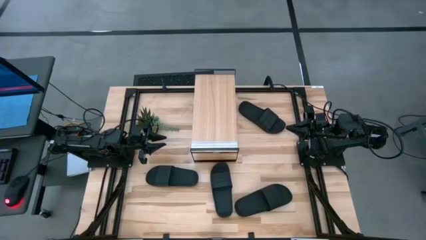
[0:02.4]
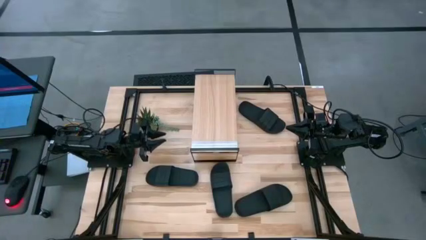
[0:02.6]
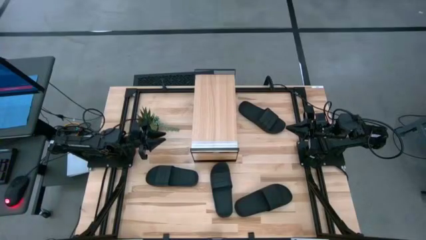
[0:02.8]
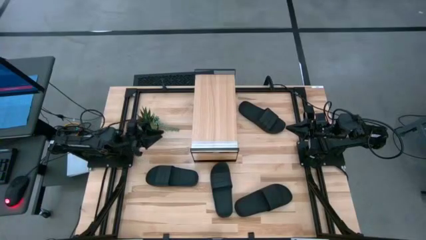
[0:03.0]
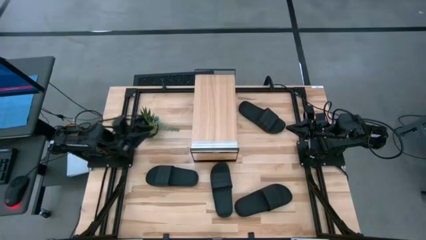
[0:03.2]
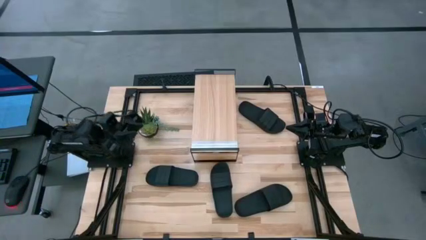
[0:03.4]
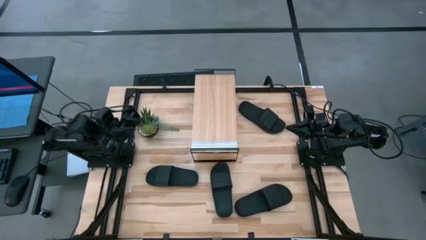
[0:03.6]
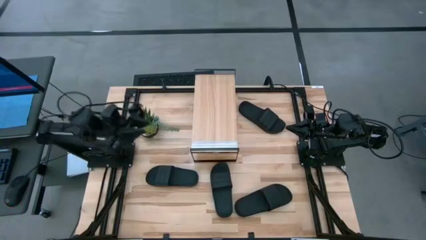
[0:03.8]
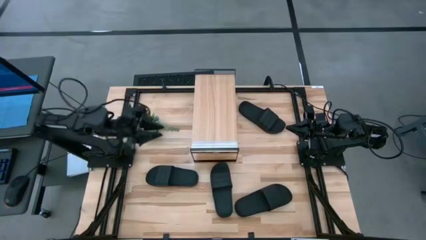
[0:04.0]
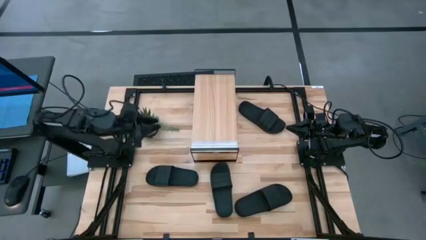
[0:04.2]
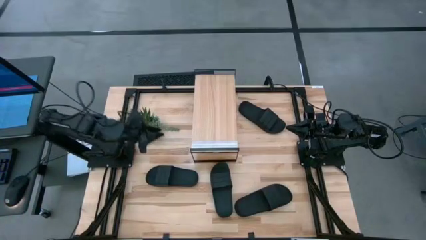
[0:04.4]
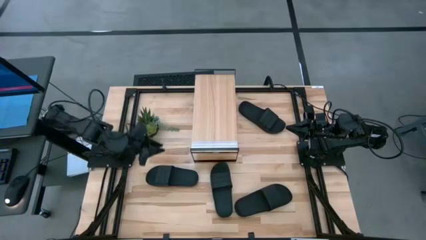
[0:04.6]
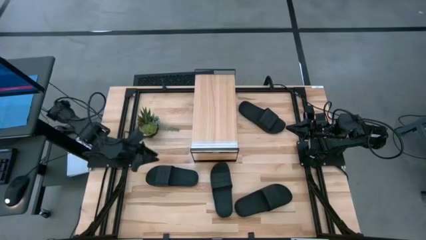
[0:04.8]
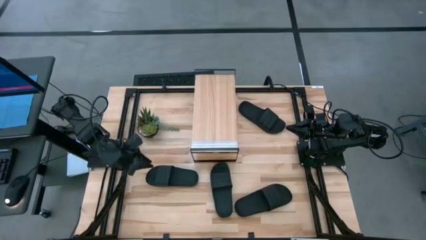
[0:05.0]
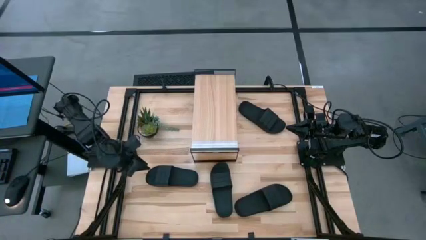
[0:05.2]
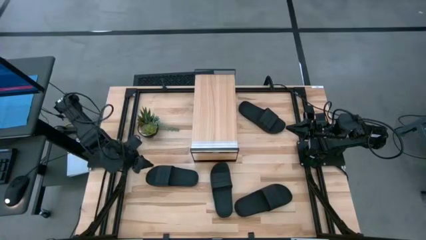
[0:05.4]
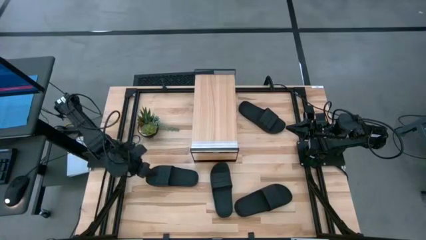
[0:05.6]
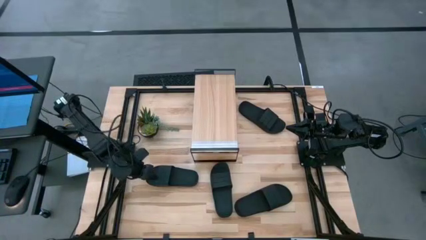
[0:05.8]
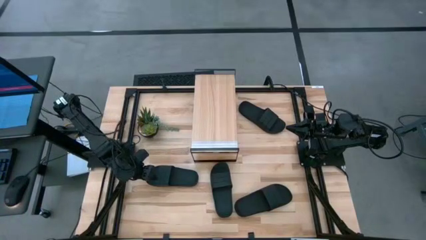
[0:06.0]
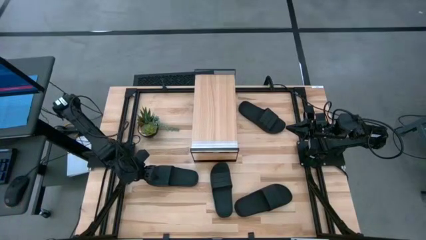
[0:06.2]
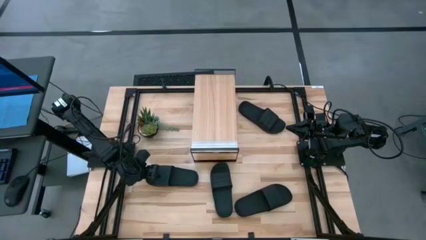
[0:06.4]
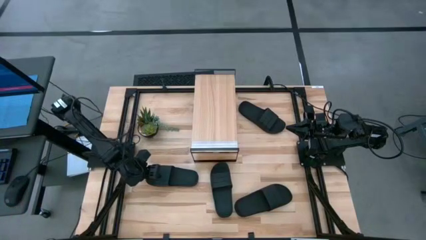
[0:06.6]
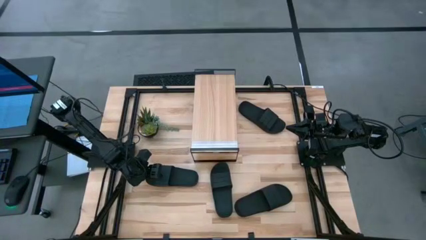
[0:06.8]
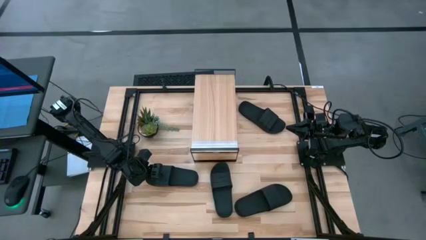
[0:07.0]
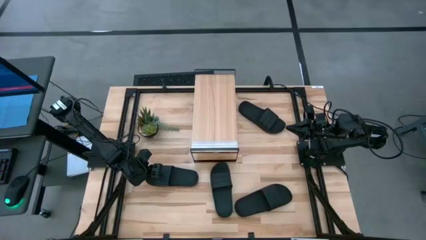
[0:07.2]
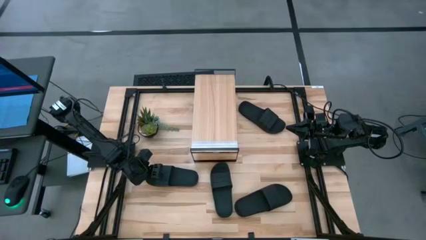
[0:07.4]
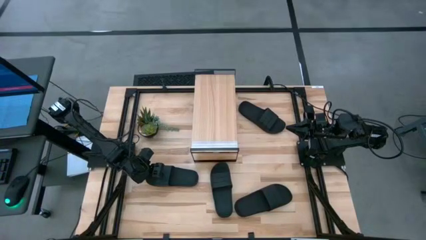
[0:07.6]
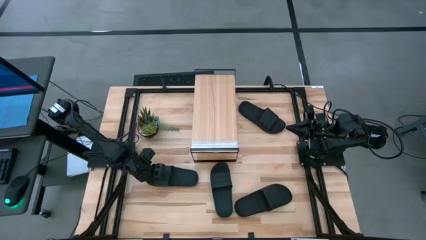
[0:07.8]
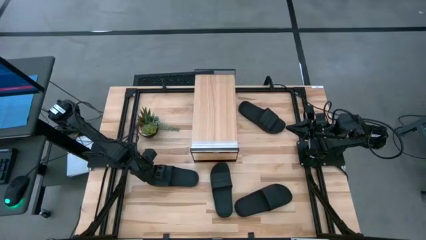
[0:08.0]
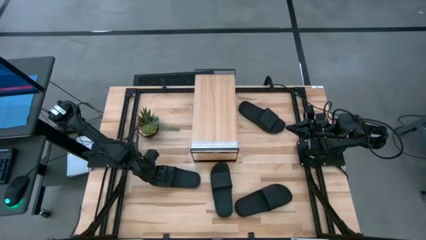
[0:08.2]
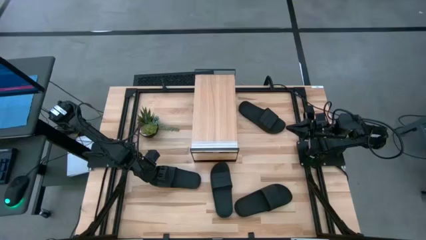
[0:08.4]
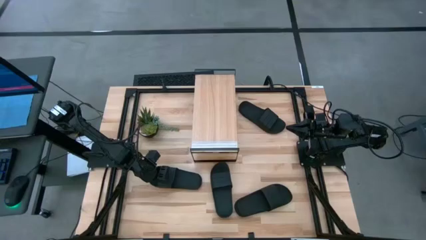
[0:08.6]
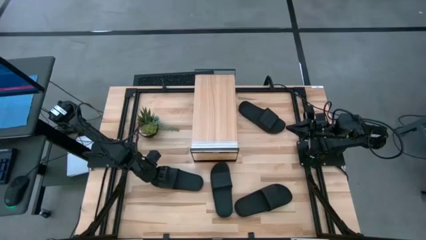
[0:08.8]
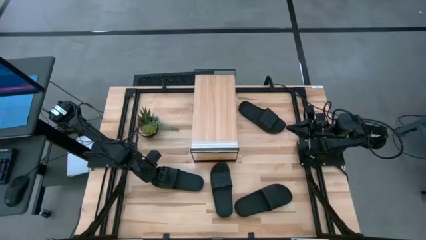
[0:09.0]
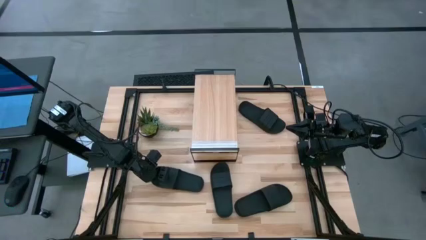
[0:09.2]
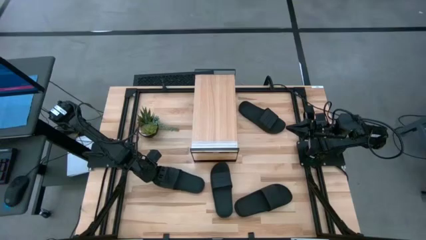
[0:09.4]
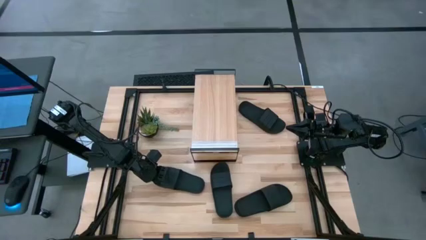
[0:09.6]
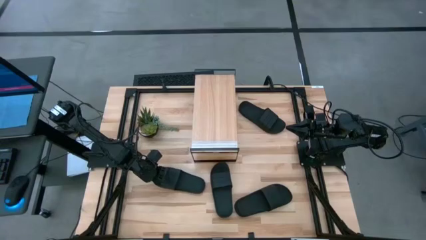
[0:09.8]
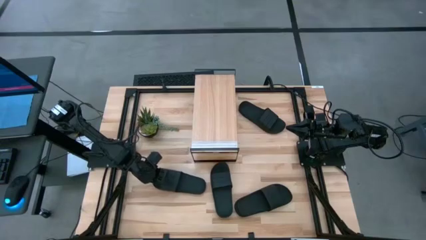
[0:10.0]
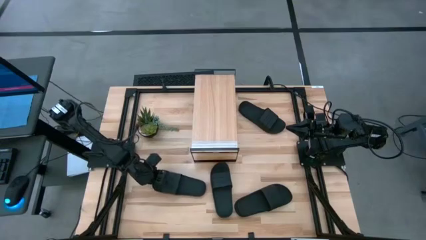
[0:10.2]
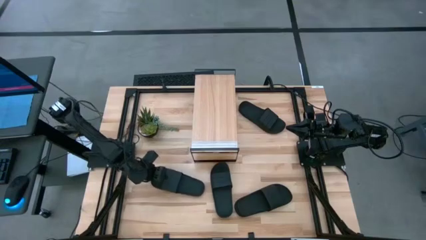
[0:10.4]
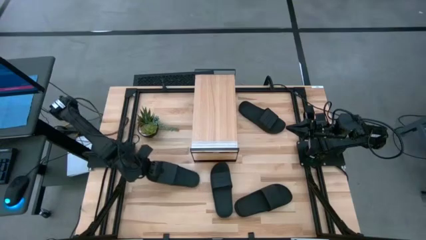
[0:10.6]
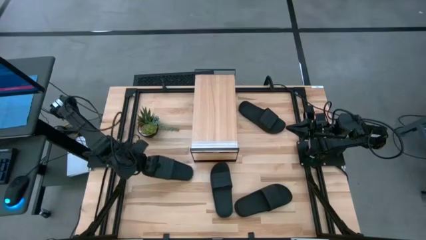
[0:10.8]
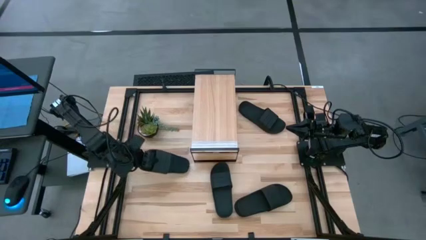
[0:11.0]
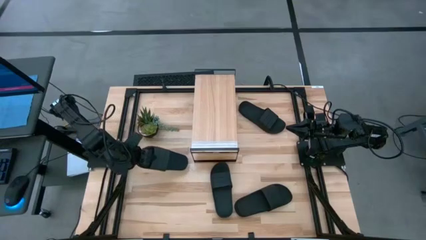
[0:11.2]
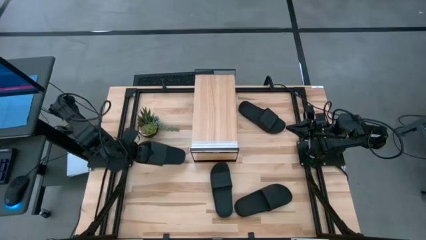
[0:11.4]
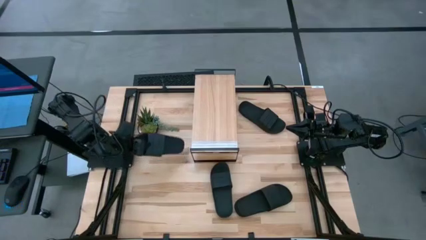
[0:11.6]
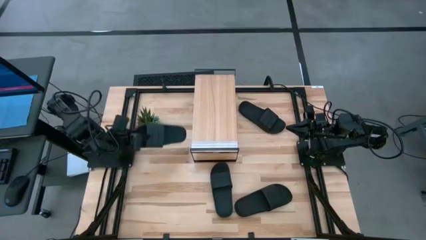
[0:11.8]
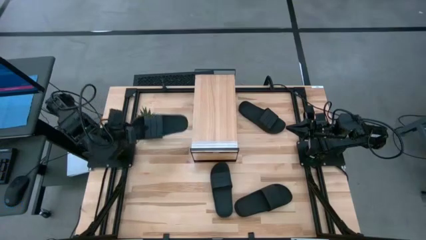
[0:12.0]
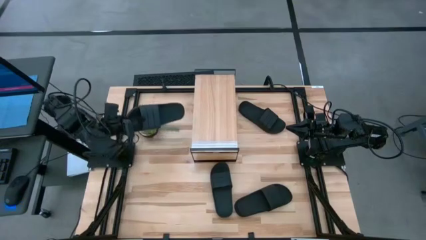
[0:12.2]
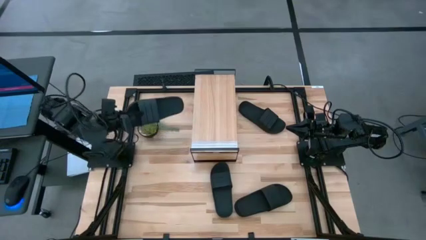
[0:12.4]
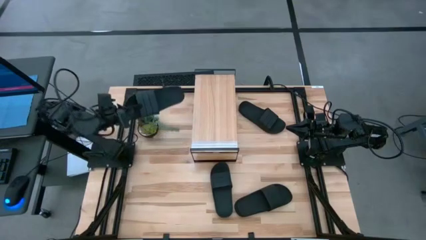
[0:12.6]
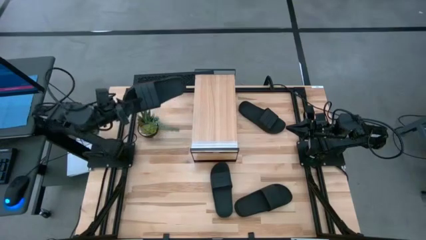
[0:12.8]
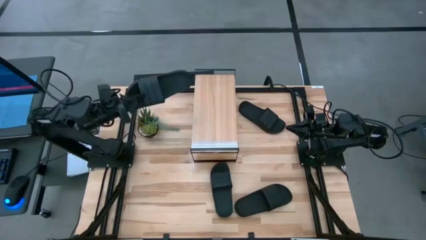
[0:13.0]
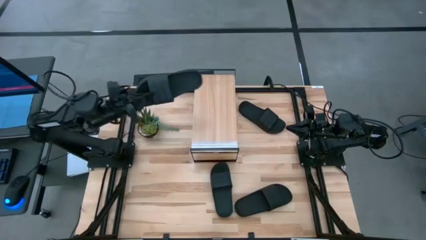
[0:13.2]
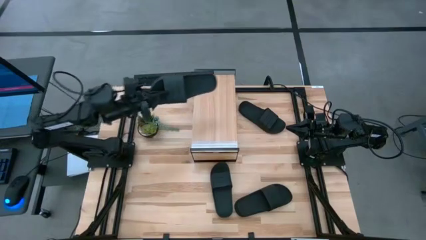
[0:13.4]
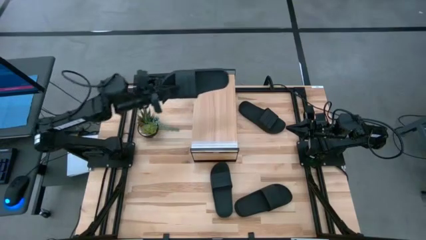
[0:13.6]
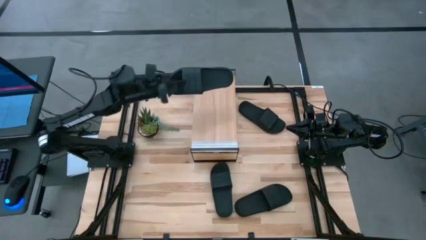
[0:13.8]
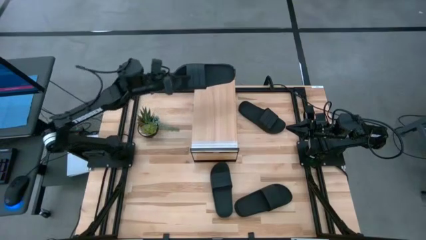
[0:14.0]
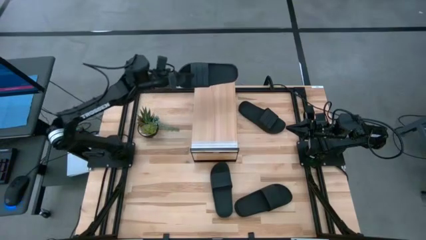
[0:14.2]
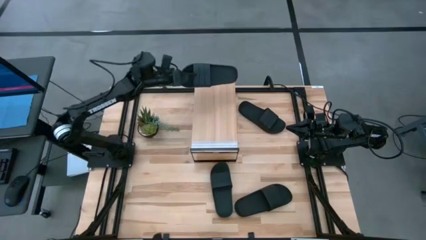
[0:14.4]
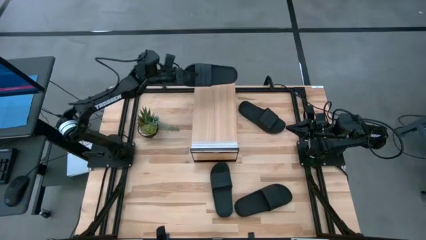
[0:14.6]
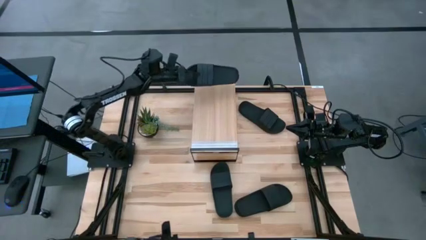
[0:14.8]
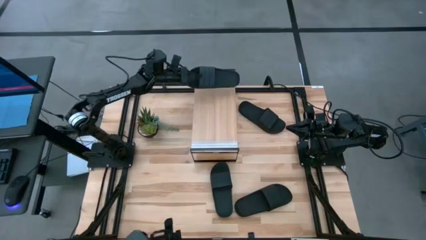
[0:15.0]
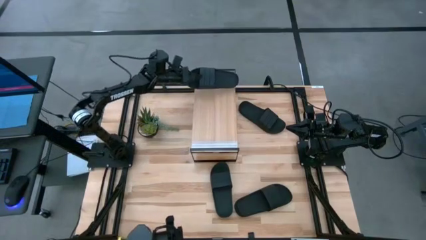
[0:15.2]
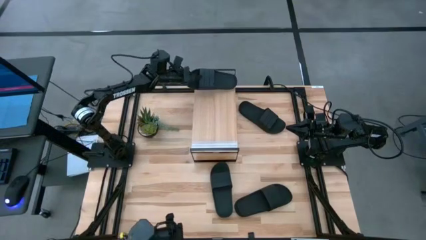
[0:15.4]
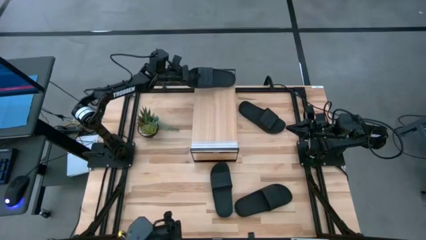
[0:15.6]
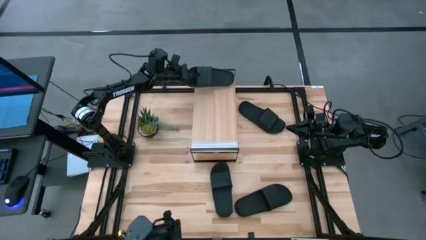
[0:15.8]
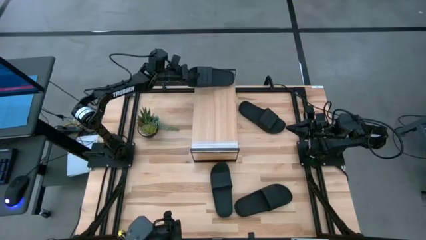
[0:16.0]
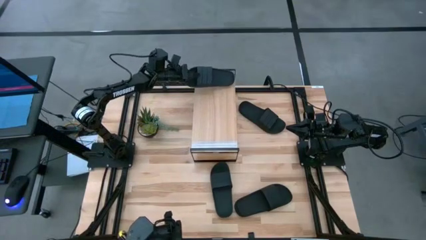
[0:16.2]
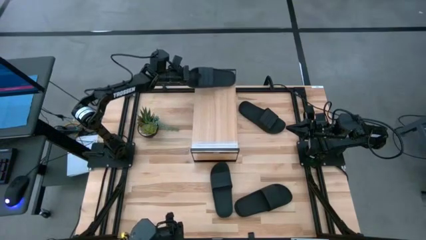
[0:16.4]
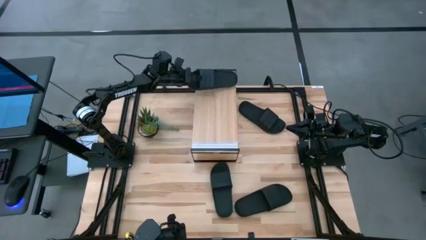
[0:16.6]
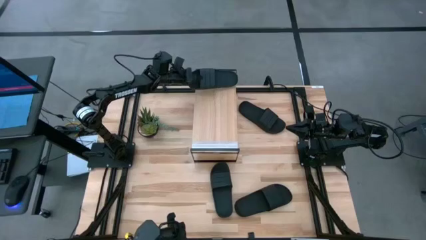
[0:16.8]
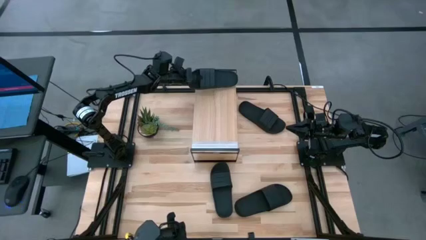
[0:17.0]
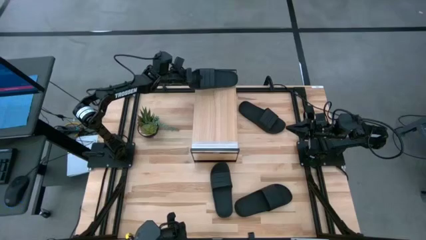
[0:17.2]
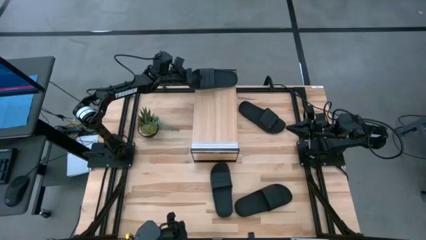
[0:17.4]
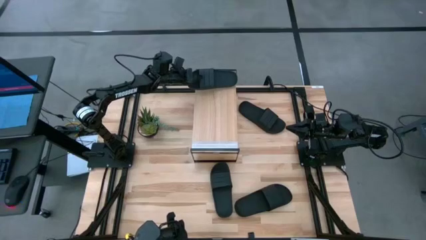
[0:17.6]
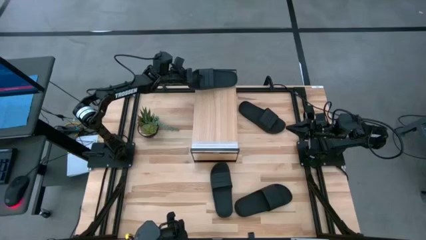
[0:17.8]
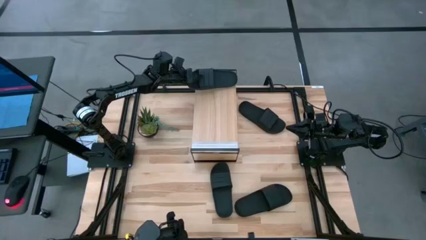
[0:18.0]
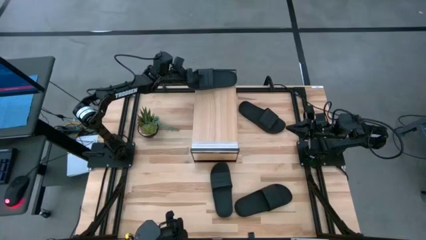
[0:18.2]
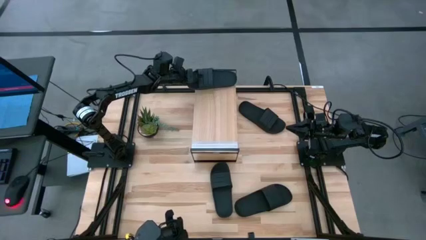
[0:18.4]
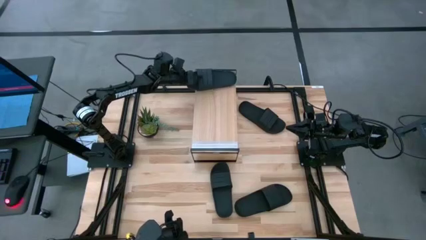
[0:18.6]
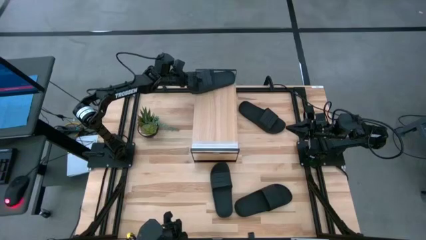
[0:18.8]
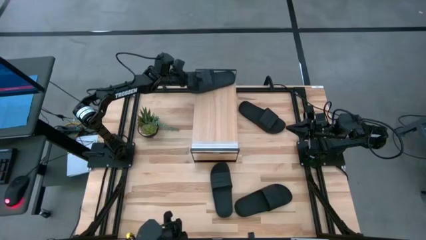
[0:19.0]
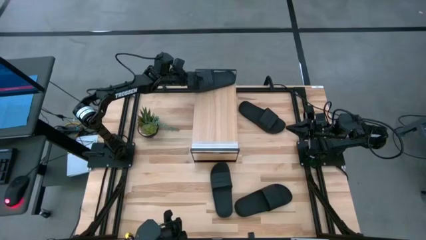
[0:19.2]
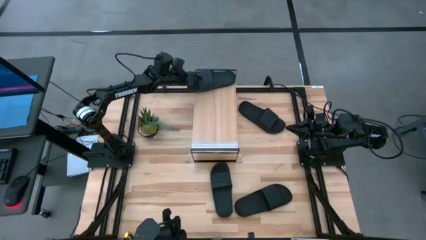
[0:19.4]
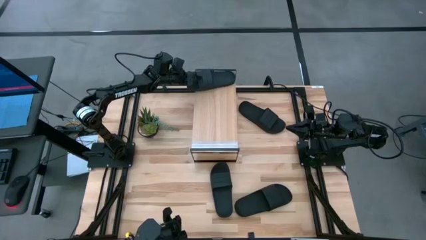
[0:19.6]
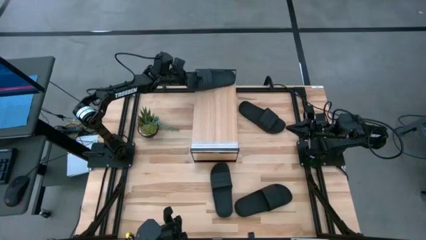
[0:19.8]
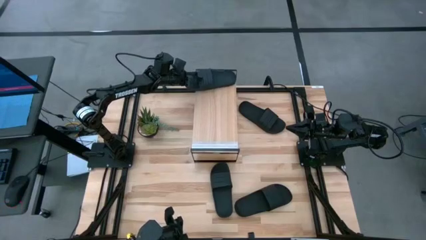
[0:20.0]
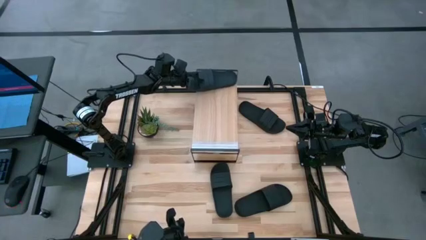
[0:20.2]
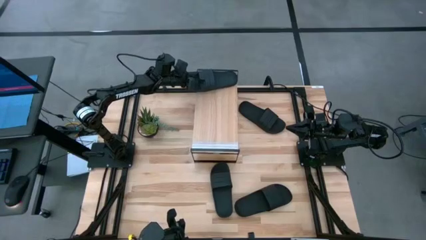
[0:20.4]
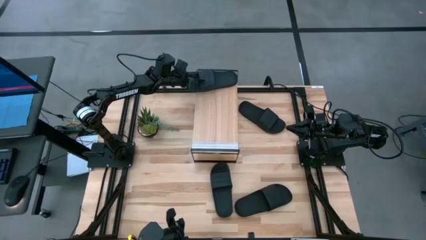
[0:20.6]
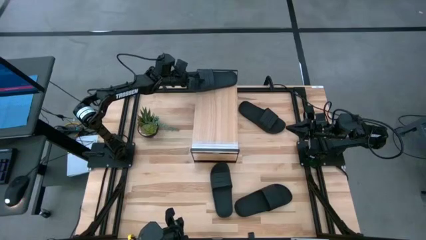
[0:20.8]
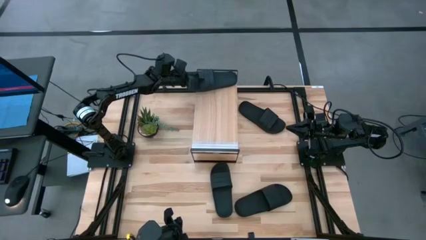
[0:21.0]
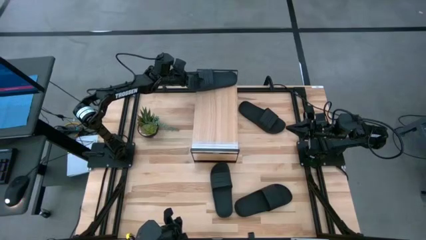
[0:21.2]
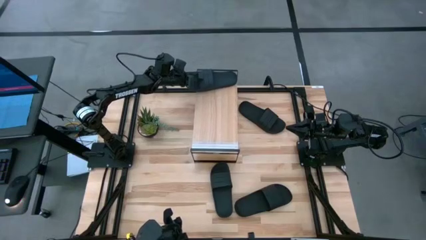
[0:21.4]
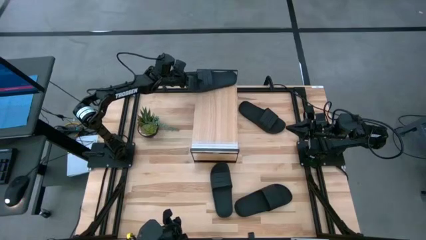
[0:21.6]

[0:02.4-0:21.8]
Task: Pick and place slides into the shelf
Put the bottom left black slide on the shelf
